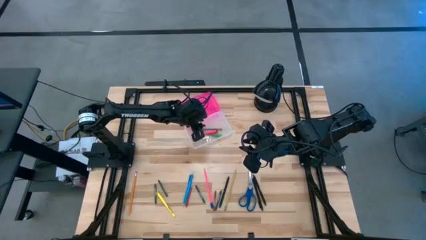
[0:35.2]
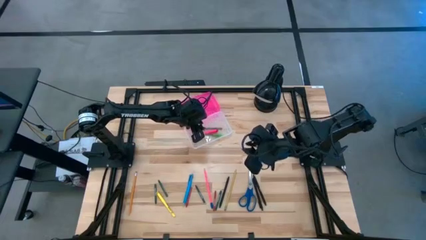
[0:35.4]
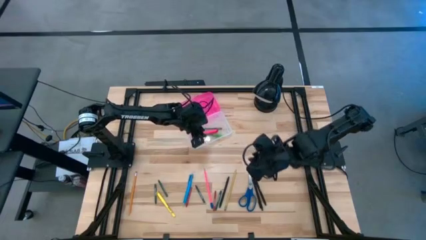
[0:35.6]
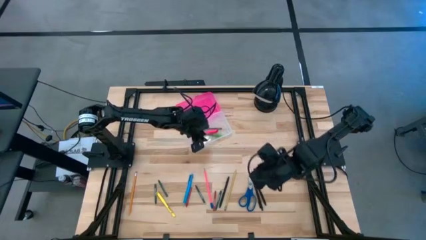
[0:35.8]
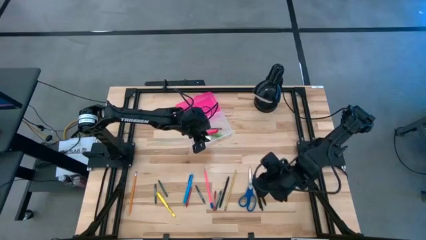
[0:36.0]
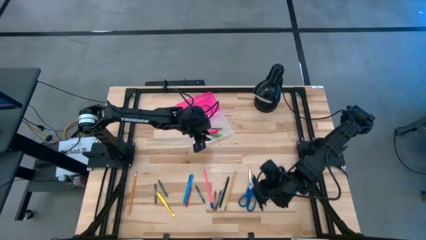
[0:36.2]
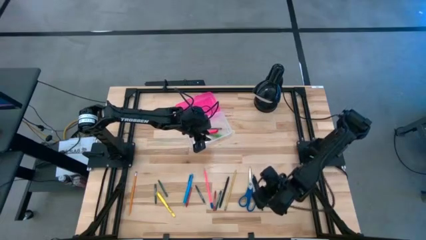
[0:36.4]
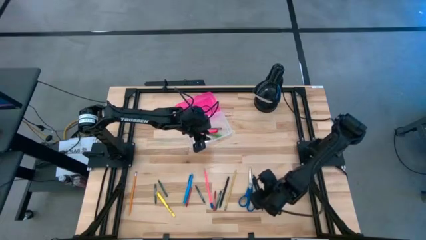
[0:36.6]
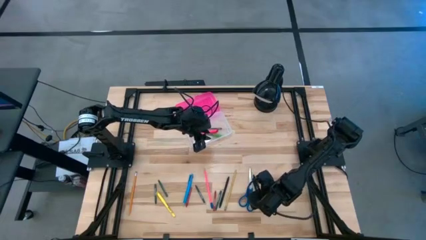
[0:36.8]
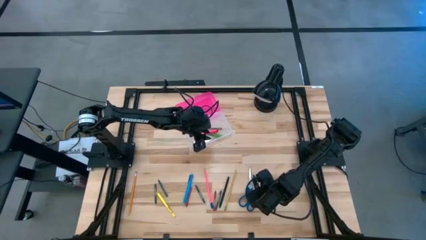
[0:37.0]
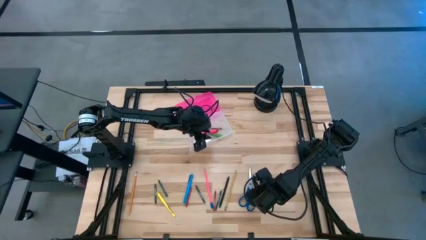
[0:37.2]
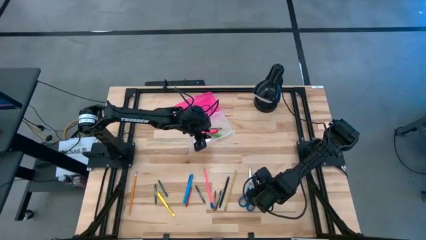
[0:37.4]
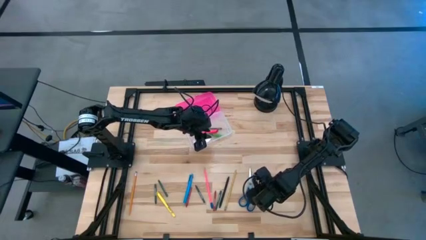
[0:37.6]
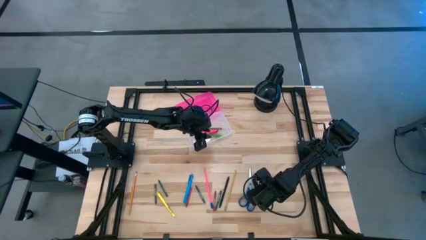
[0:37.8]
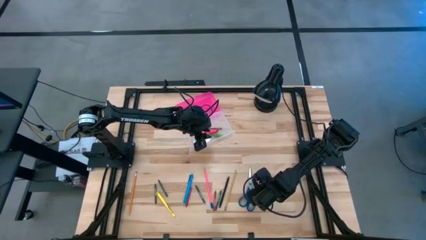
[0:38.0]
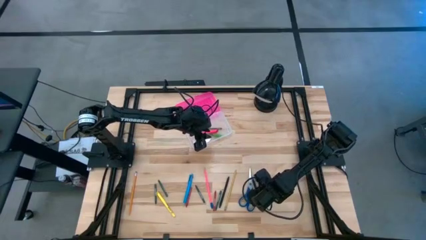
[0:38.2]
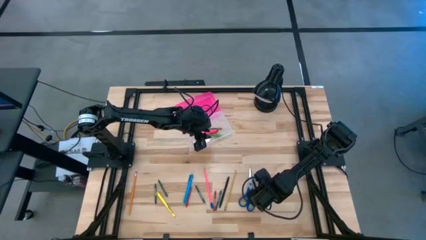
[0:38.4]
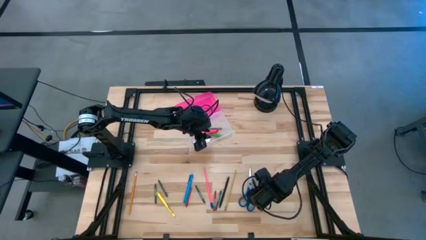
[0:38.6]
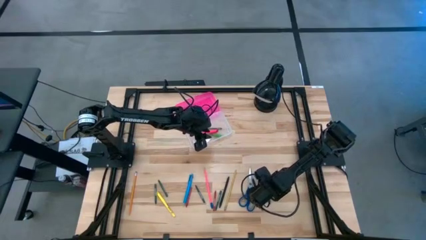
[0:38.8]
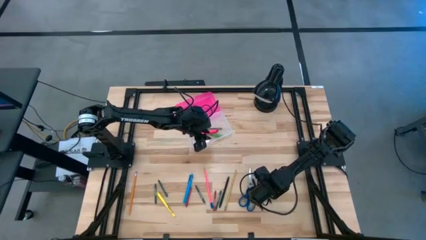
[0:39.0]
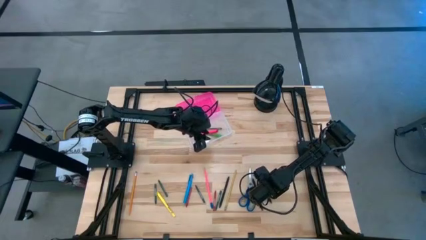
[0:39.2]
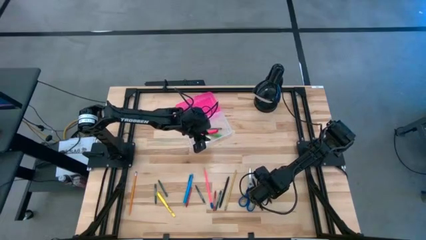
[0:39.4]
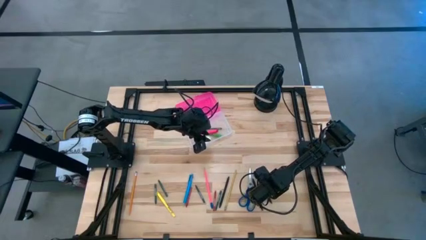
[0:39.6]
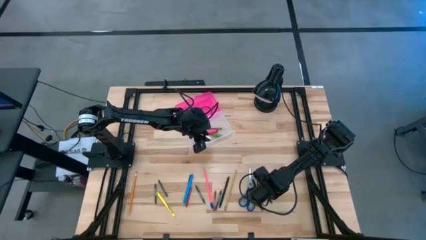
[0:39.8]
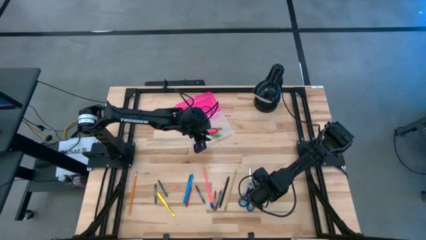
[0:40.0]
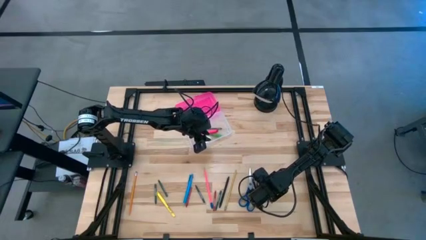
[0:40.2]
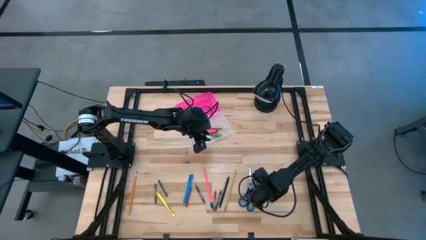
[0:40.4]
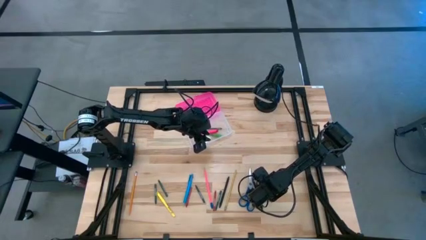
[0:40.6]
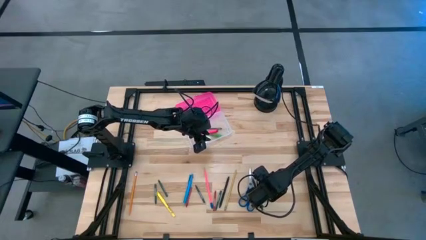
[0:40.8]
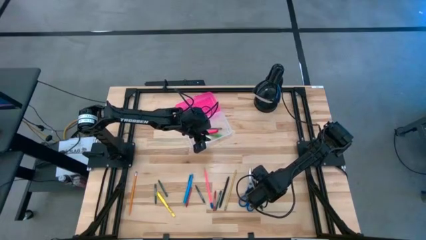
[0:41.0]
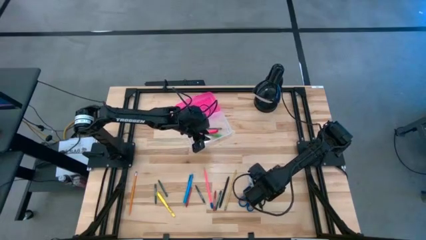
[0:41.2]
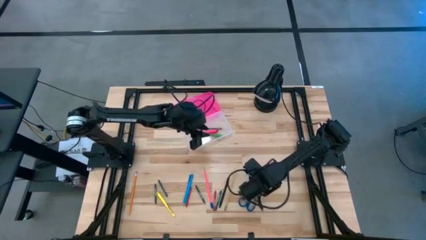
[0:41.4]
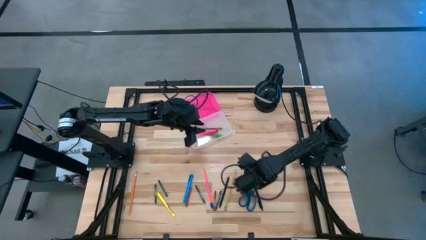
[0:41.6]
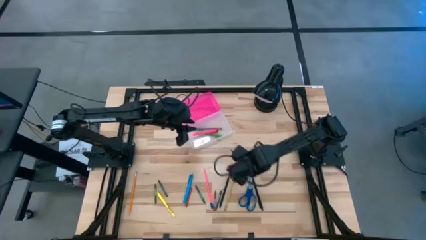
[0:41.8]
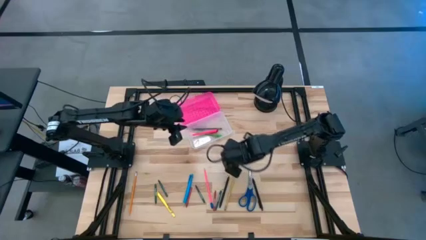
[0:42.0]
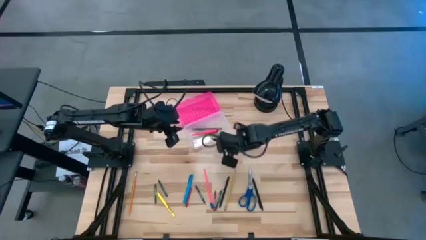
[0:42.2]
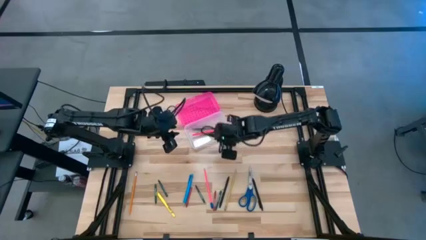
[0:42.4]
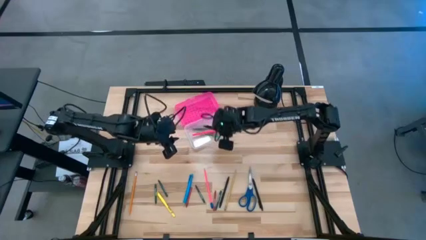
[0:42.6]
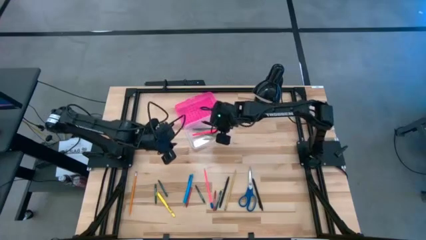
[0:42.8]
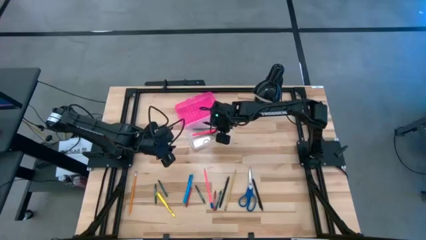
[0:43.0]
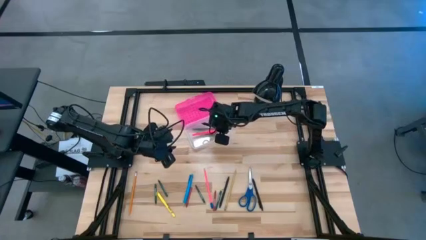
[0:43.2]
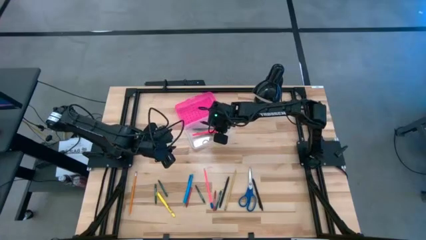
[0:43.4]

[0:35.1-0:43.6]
Task: Pick & place school supplies into a supply box
Put the black pen into the pink supply box

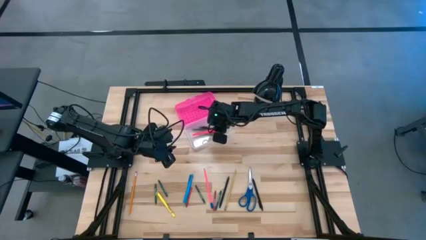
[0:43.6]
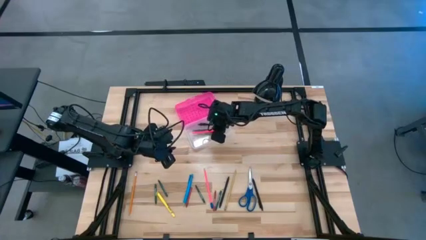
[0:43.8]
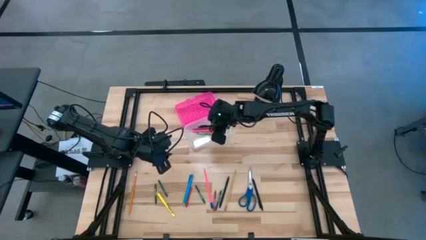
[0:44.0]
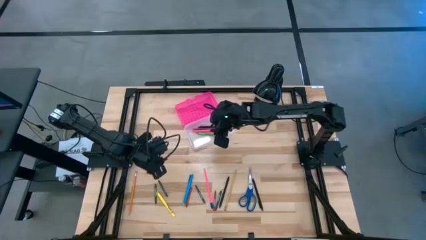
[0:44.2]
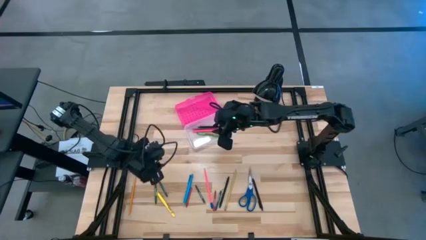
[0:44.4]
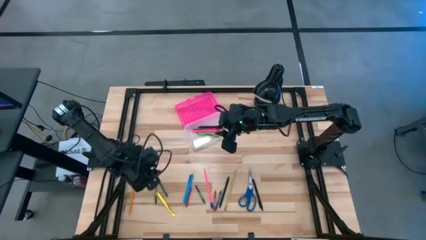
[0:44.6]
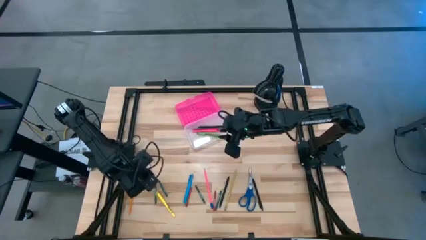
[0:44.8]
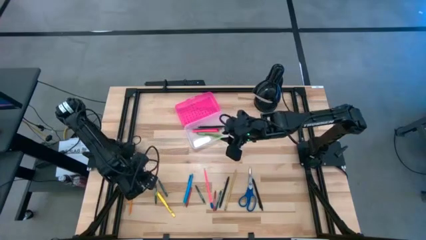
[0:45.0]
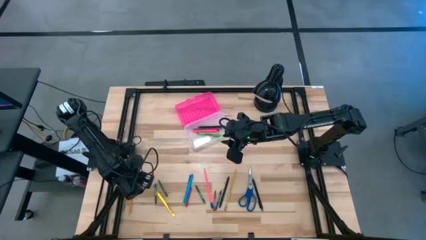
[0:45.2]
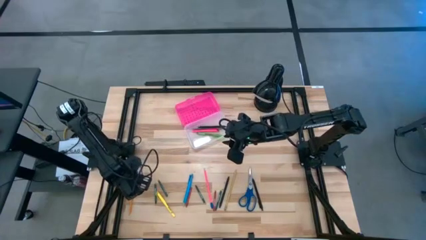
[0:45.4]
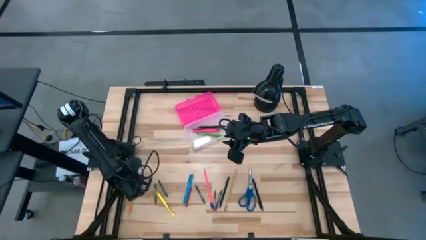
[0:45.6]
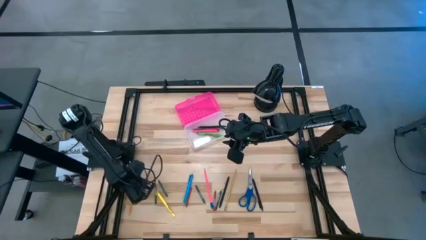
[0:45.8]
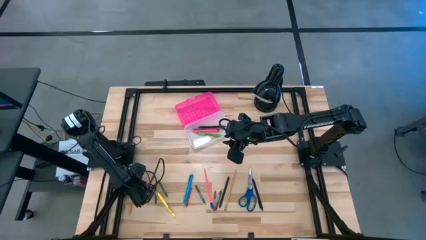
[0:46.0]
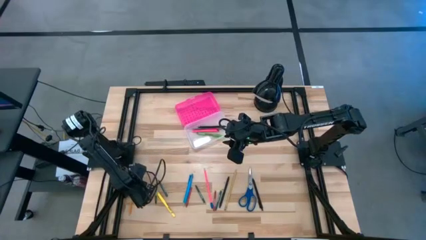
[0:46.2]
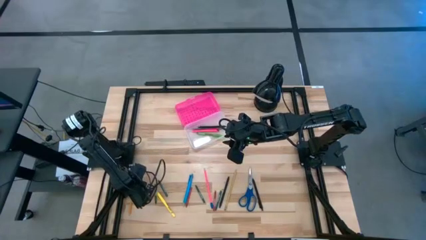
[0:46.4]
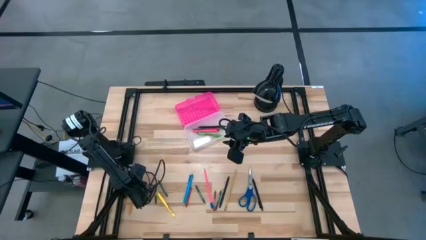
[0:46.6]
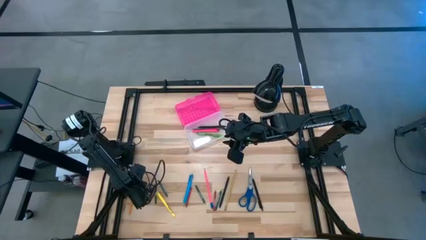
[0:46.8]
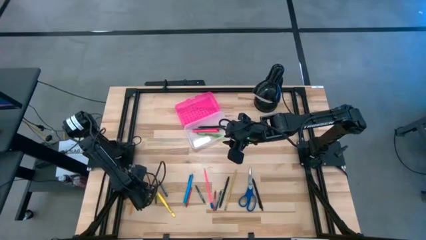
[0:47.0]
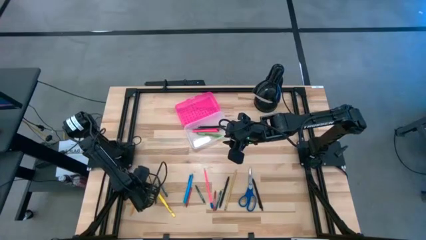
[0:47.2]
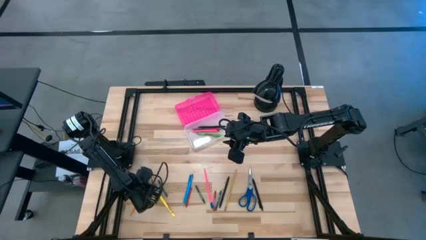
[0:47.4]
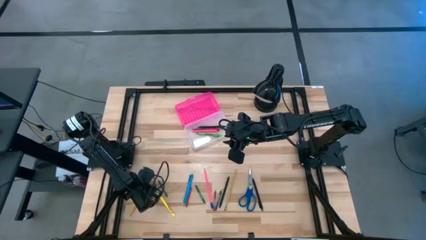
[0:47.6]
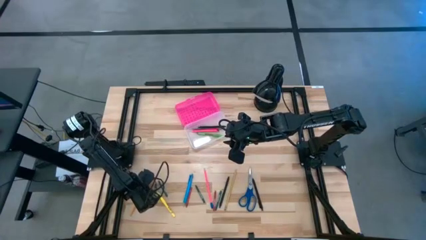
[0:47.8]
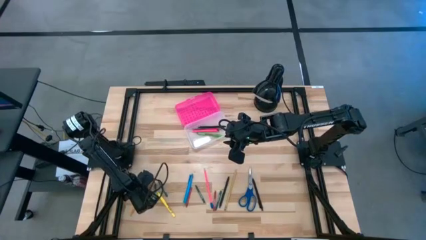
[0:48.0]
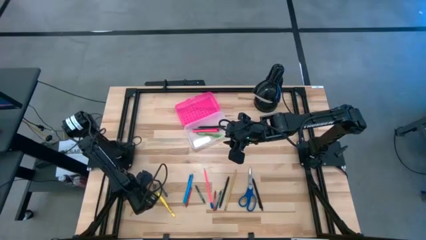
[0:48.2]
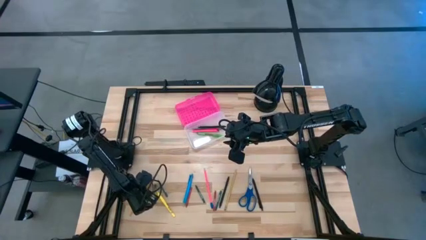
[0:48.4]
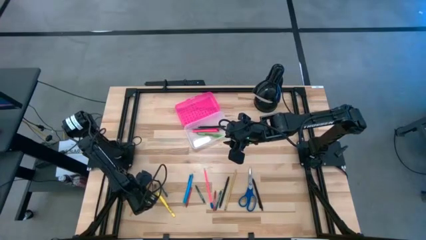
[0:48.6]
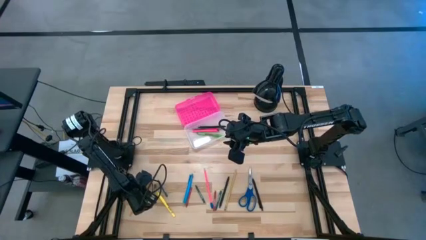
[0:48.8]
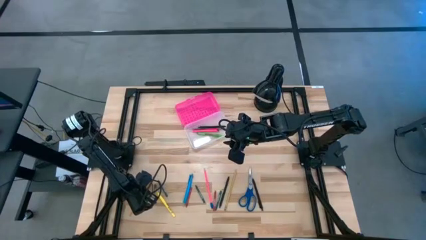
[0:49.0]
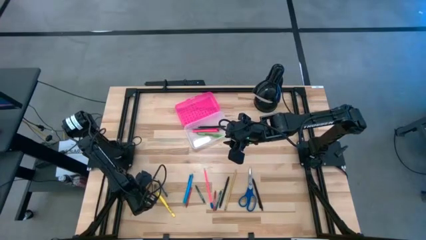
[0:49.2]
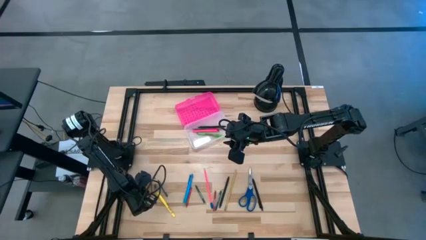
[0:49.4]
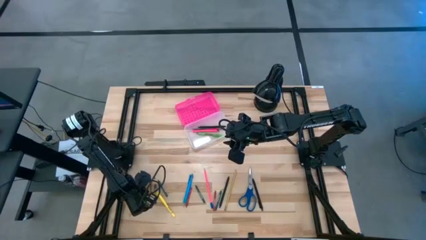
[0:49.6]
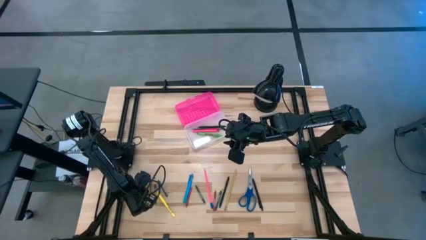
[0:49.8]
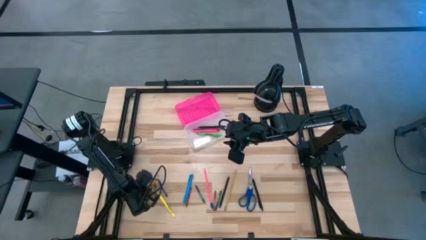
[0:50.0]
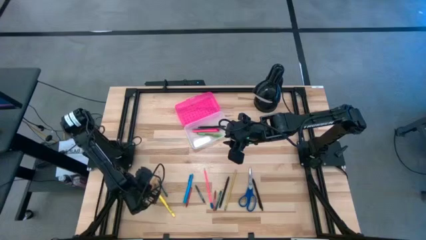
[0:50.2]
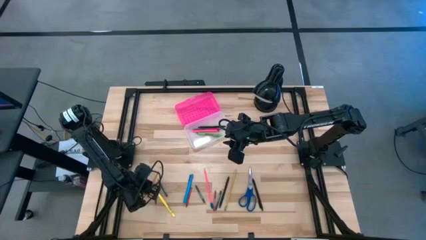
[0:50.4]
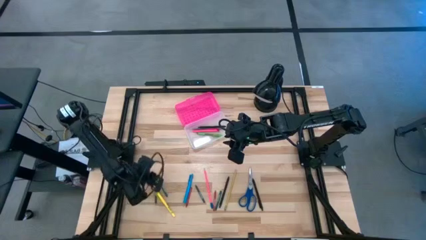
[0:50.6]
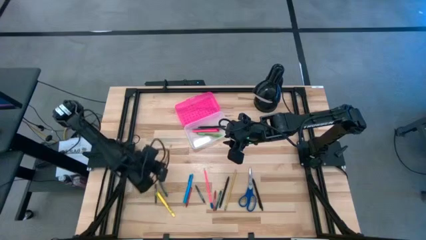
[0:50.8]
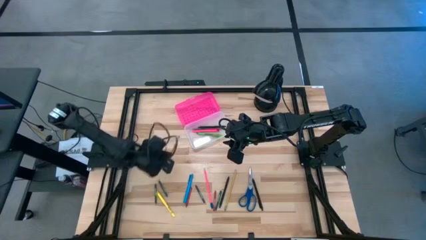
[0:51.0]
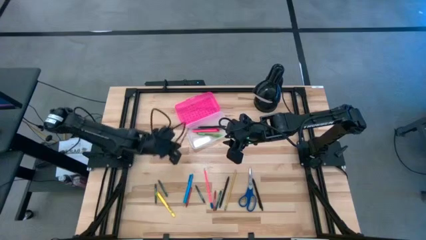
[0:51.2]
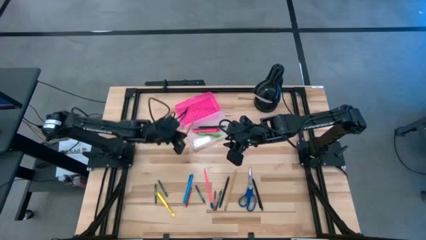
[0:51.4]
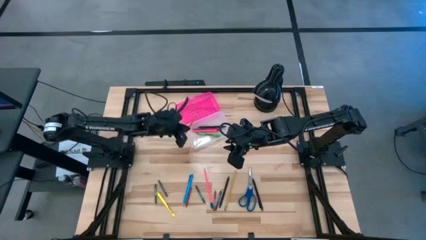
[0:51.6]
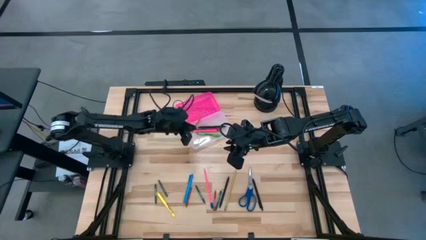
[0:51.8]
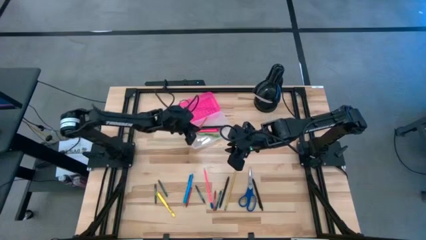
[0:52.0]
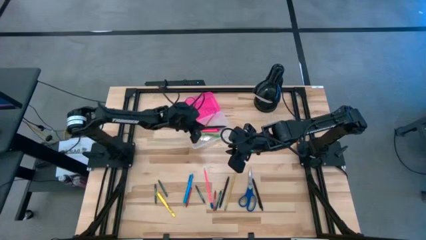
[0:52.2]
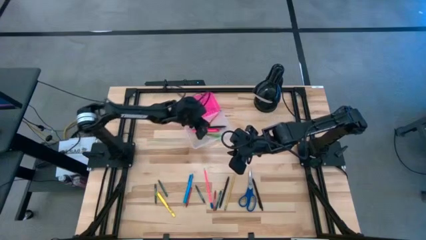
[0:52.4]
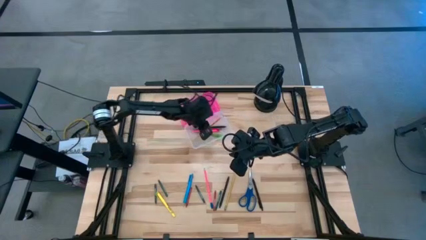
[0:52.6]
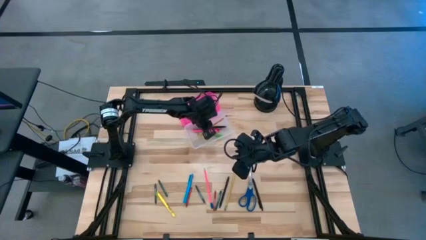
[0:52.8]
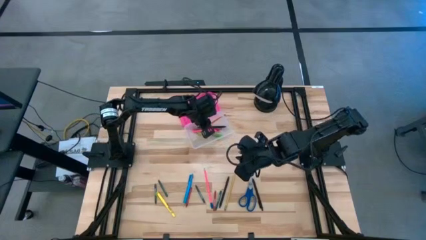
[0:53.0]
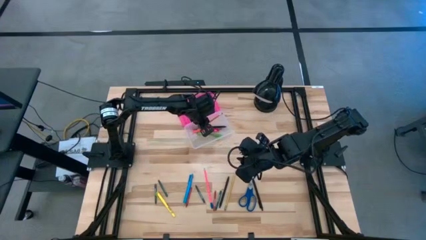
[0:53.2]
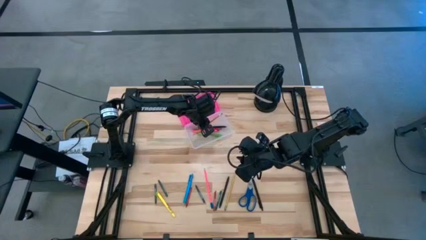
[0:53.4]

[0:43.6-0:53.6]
Put the orange pencil into the pink supply box
